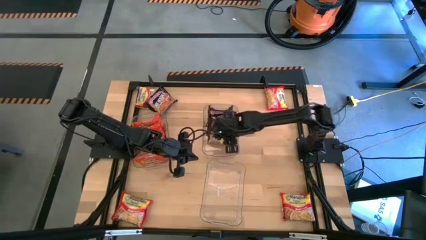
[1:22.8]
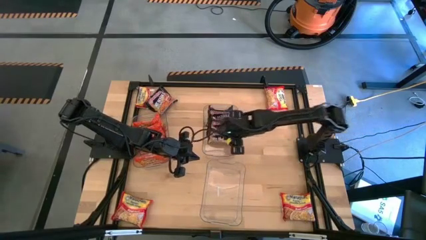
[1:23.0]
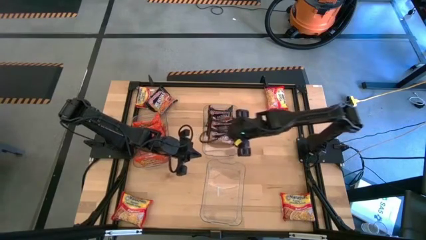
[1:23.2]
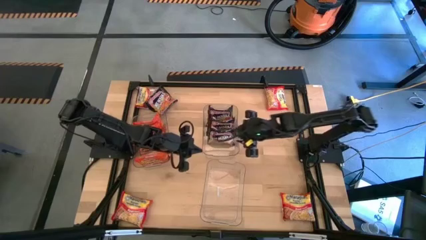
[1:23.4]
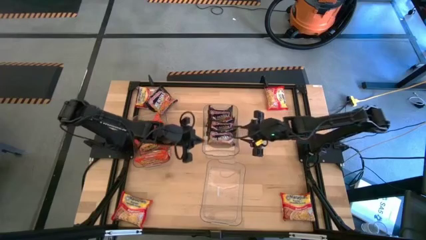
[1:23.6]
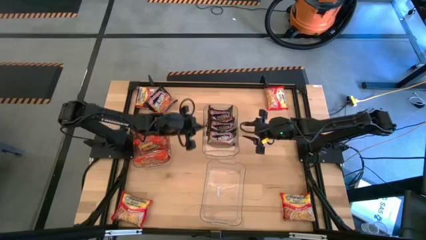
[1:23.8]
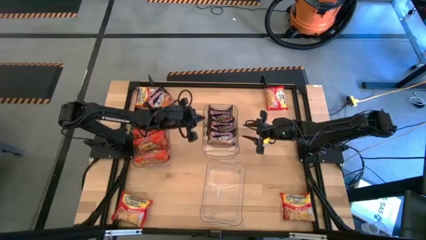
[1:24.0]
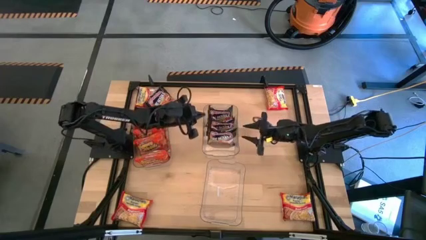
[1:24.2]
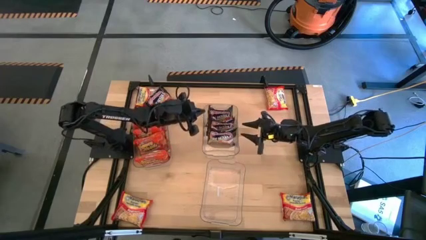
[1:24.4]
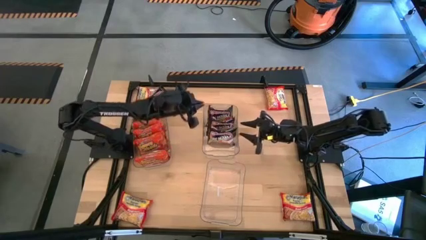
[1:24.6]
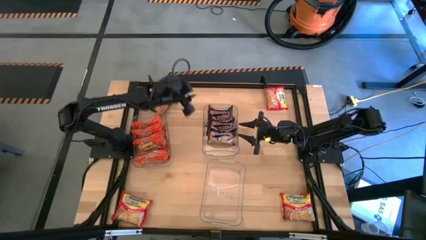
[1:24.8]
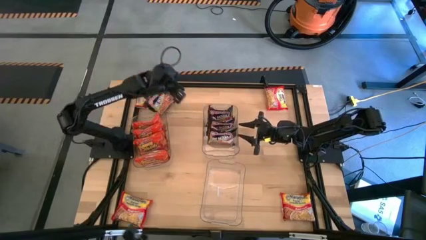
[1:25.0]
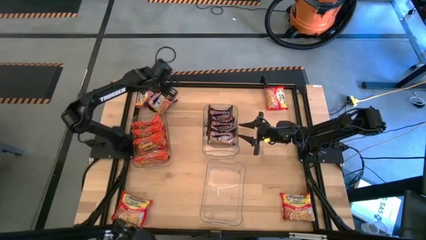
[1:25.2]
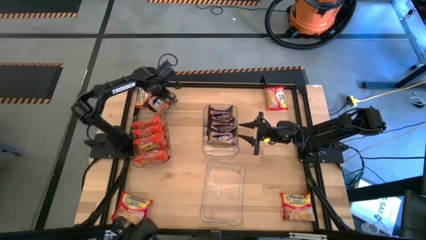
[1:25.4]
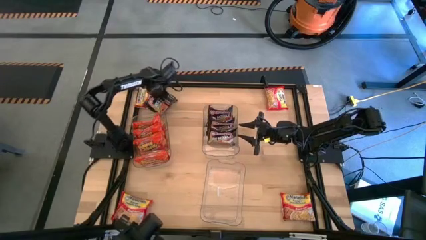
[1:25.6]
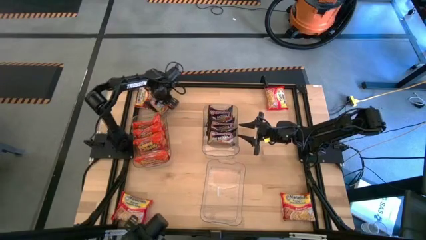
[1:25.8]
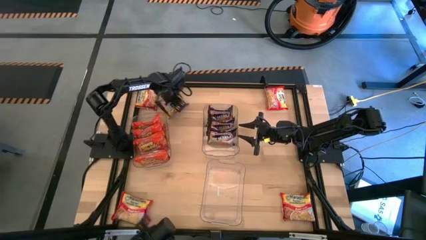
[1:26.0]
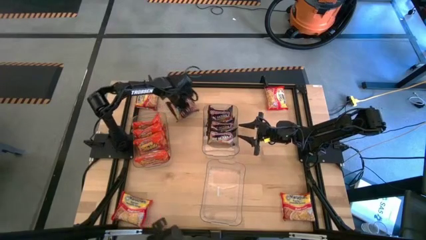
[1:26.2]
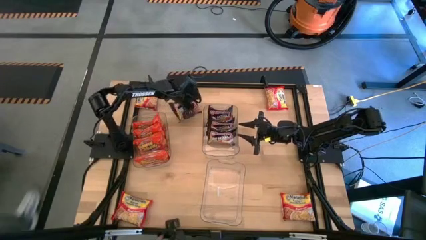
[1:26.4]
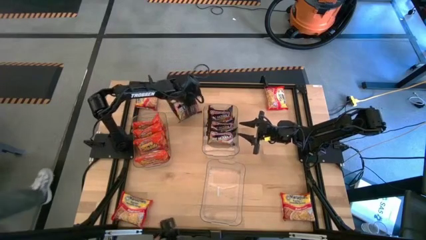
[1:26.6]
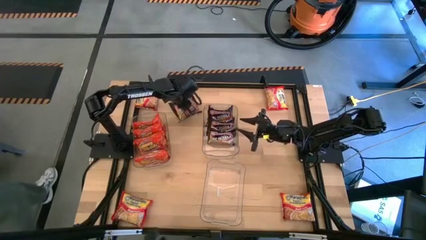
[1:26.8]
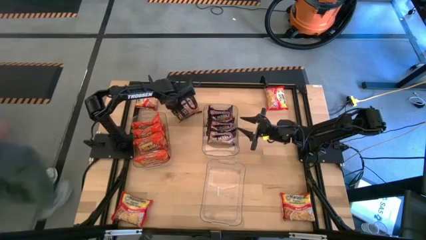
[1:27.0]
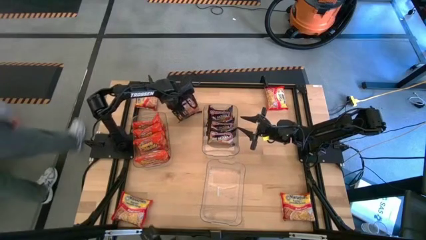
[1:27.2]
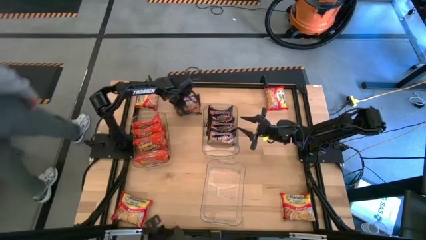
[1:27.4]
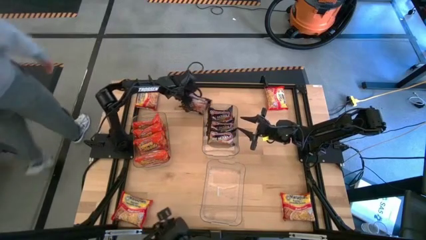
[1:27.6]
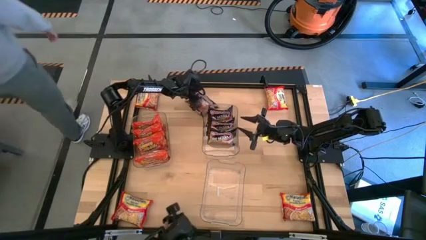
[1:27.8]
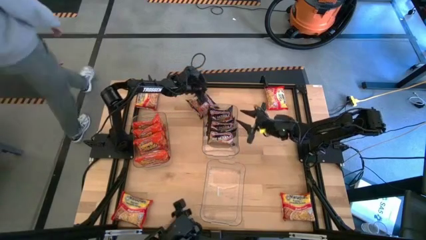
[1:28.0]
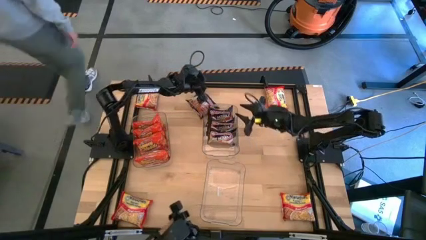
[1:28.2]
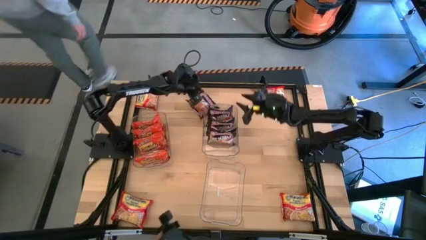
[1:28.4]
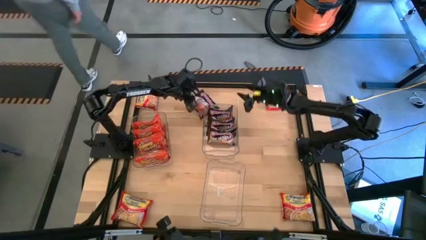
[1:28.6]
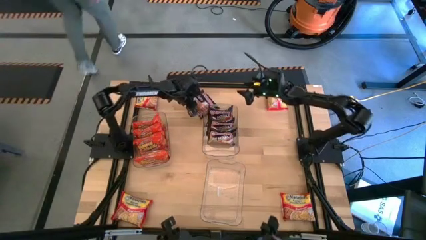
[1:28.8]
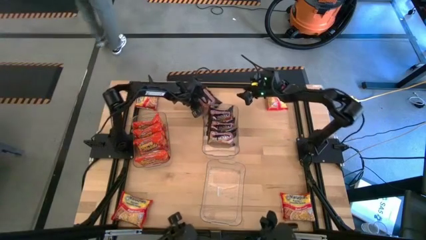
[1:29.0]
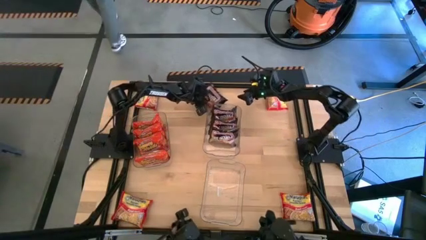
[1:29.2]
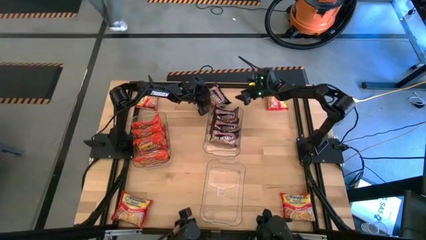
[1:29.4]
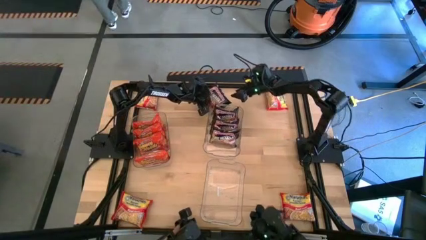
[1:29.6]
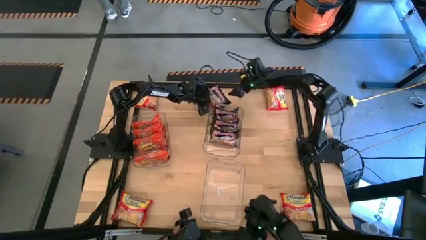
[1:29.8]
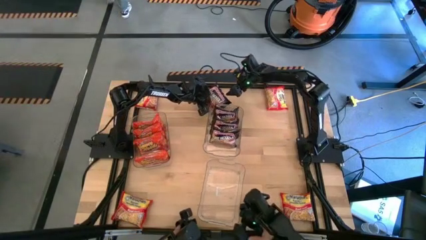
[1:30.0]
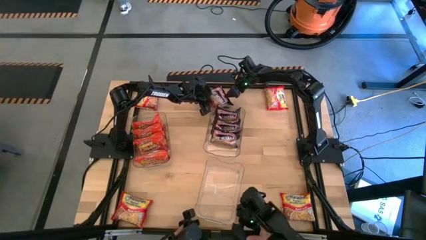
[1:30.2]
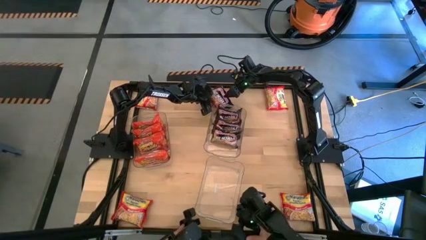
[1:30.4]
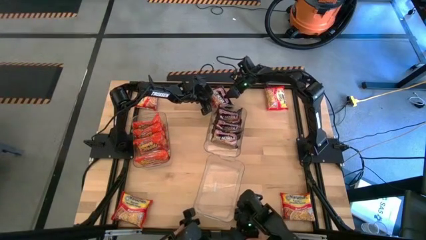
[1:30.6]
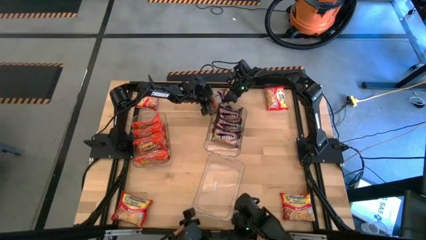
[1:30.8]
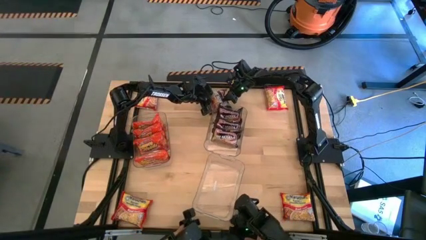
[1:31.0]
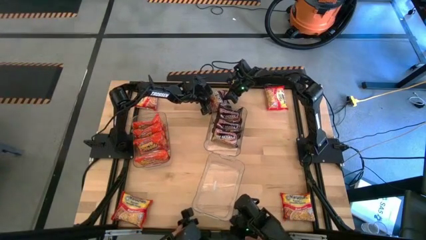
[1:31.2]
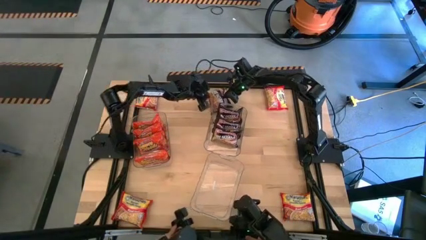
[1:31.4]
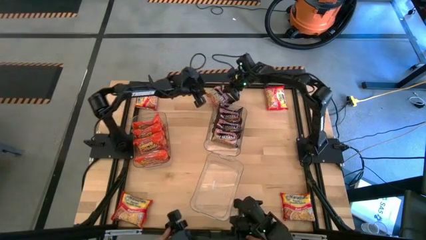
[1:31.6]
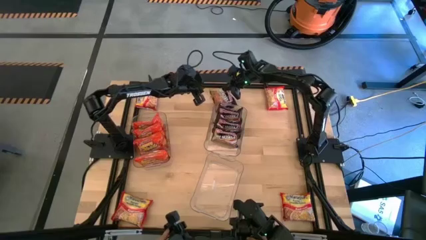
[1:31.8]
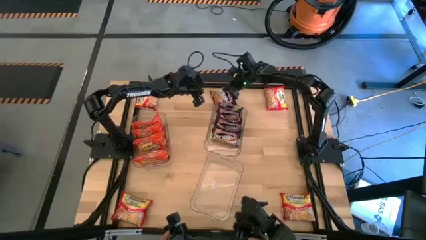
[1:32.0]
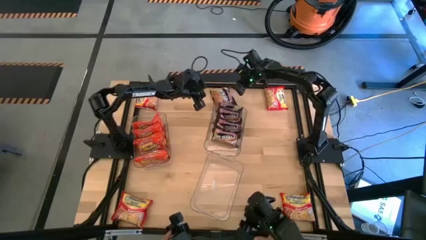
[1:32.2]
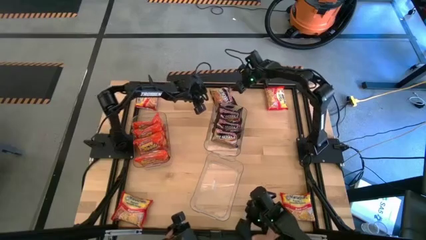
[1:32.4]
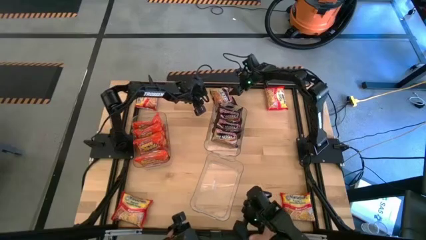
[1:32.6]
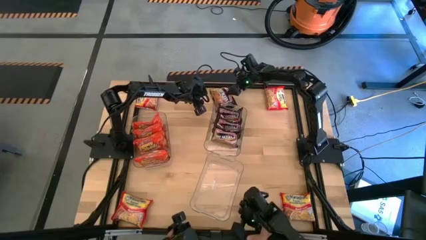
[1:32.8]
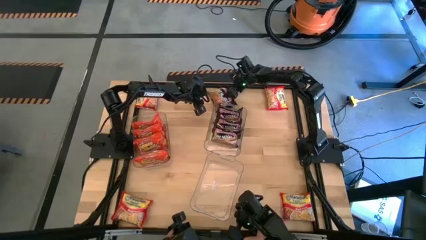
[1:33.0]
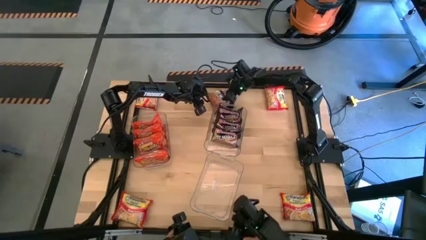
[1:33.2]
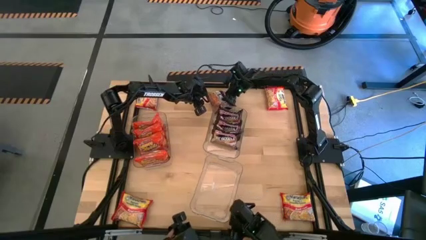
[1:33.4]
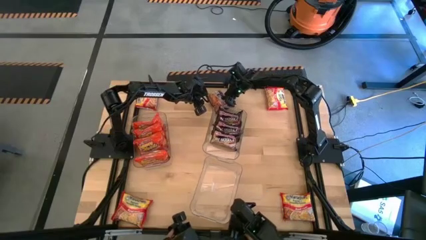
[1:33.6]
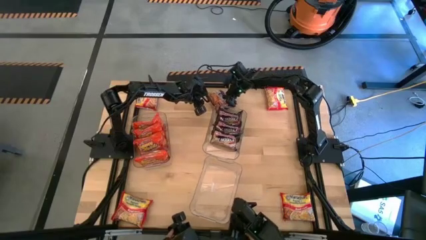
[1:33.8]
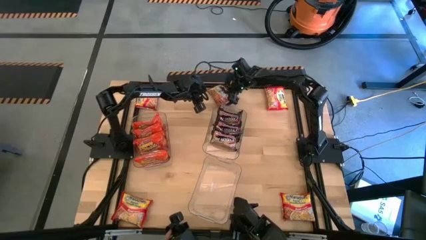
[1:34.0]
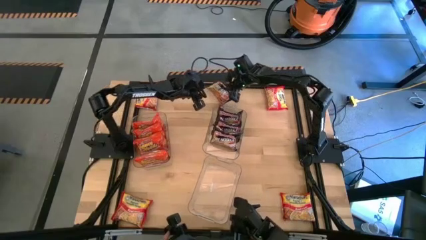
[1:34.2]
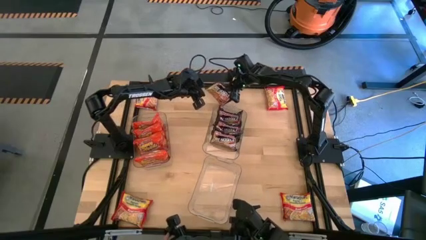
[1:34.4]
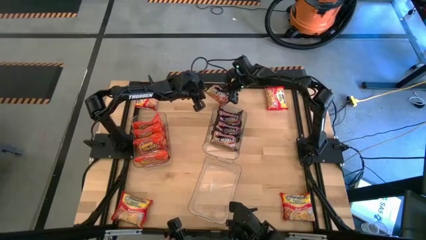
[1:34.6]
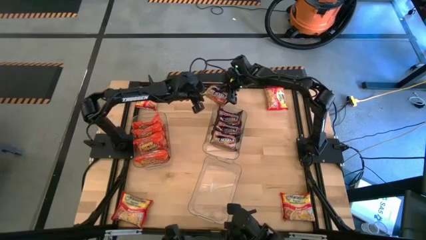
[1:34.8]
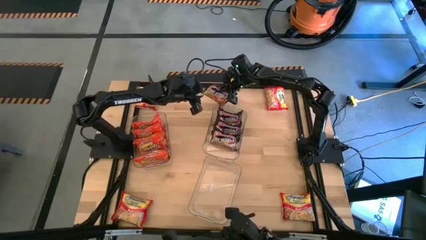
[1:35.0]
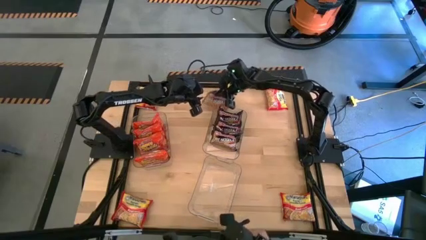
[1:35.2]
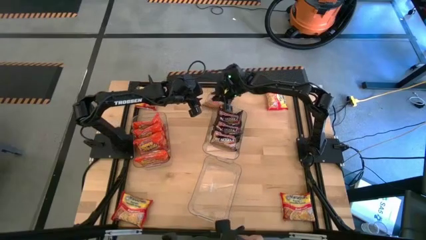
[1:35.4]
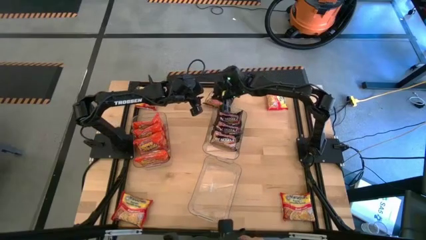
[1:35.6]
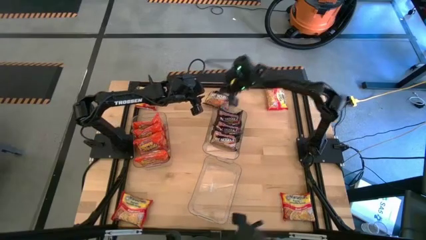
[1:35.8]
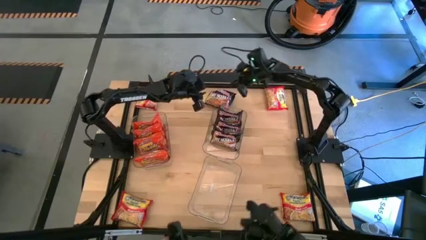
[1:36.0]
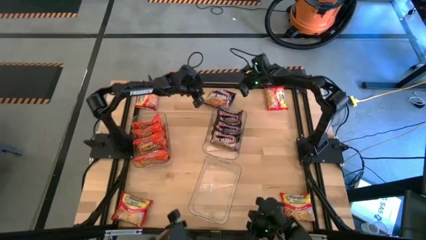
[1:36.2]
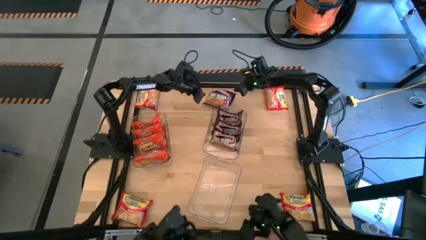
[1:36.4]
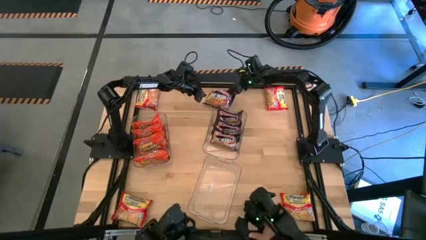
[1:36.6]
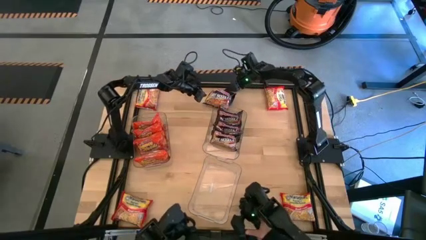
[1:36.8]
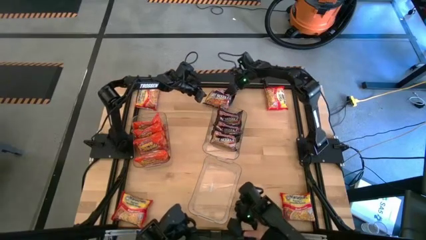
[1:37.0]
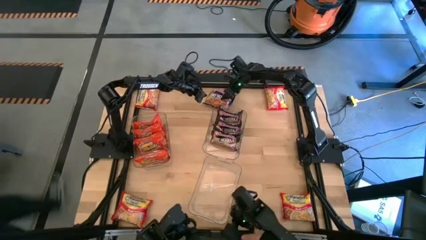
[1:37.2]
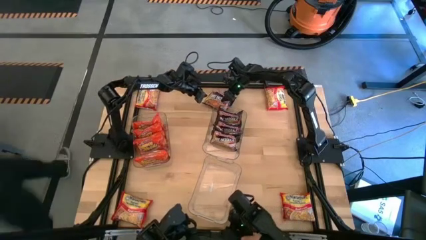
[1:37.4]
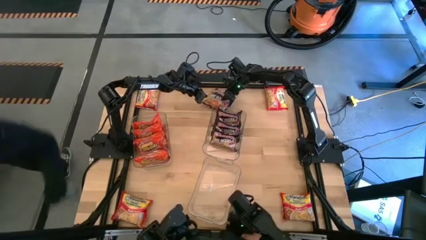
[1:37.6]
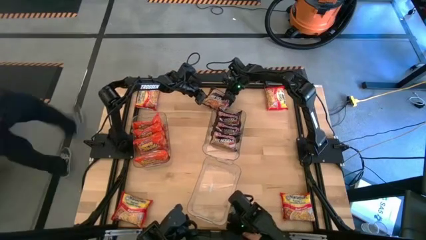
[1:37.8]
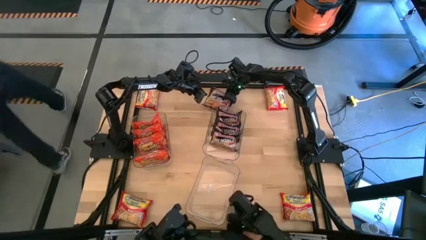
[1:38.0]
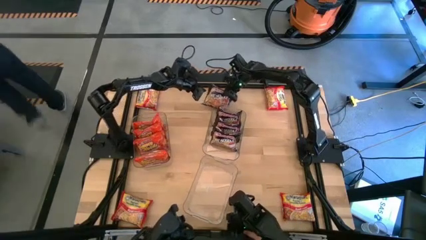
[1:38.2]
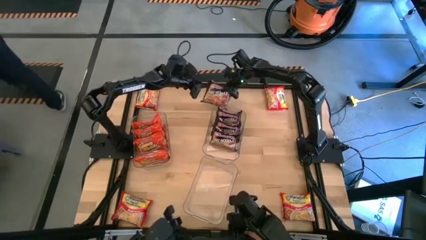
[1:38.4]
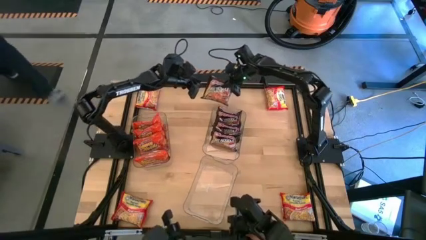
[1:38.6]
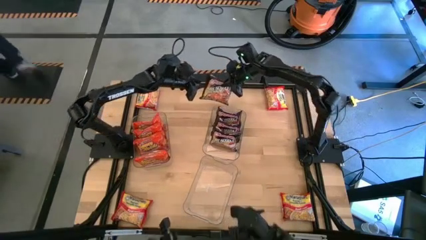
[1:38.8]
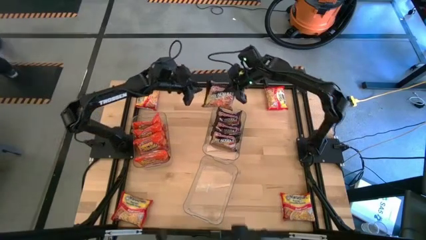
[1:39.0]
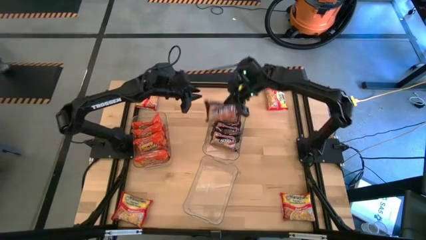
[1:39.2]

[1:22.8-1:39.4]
Task: Sort Maruchan noodles
Put the black noodle pack into the top right transparent bin
